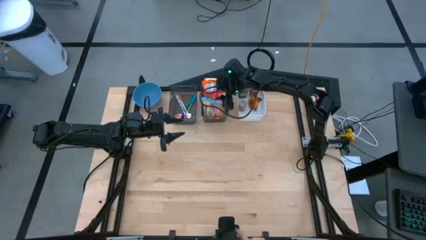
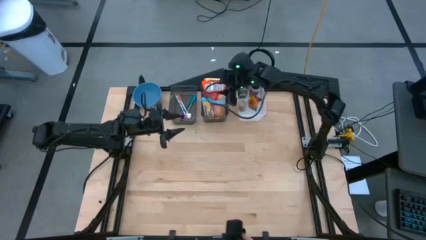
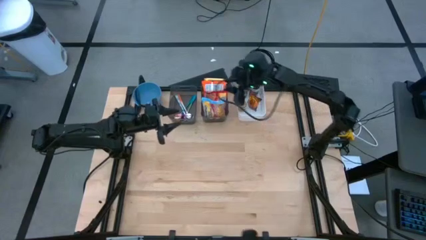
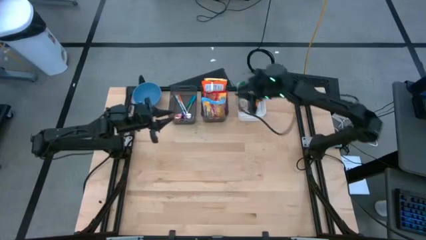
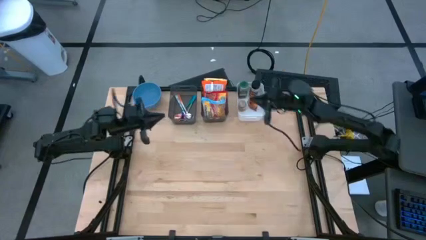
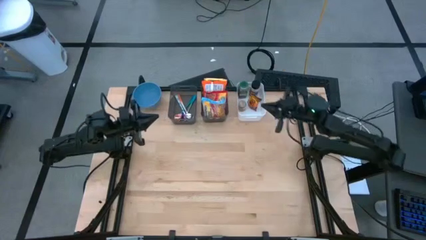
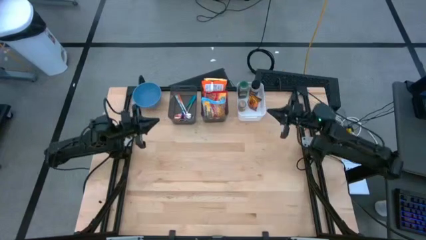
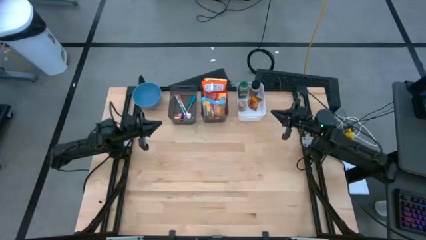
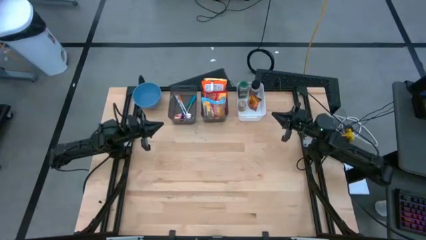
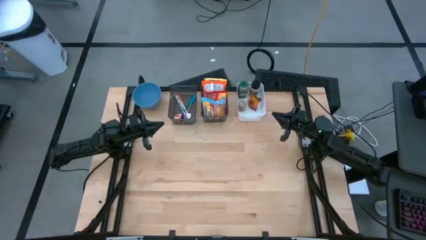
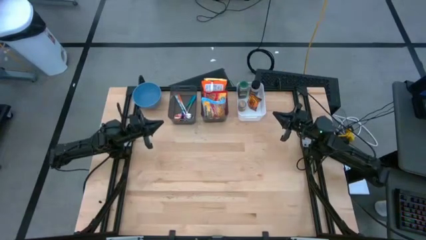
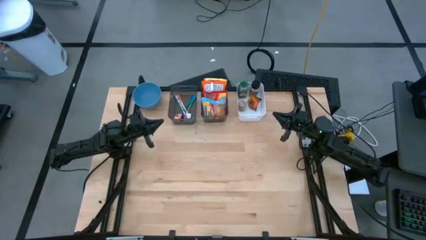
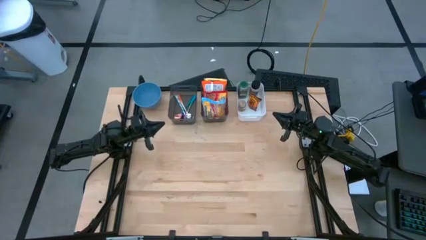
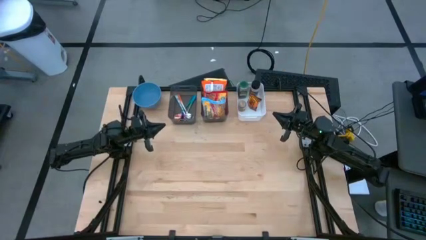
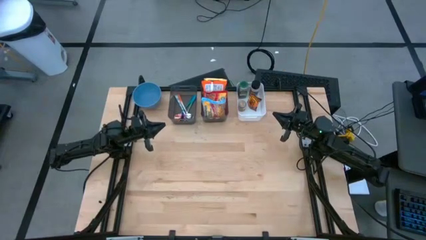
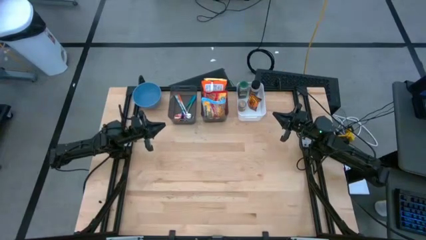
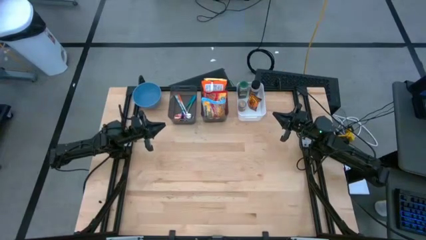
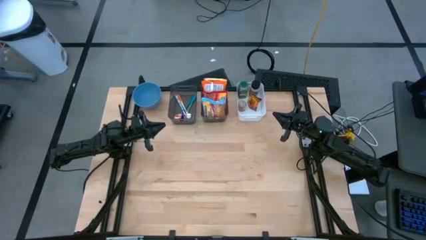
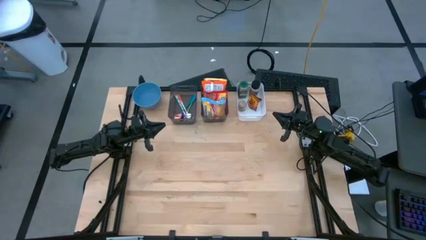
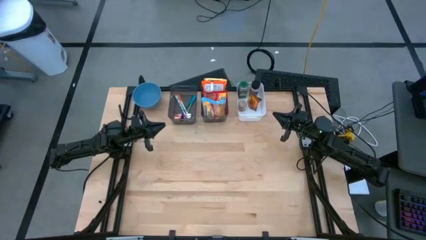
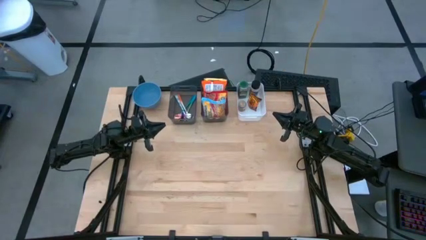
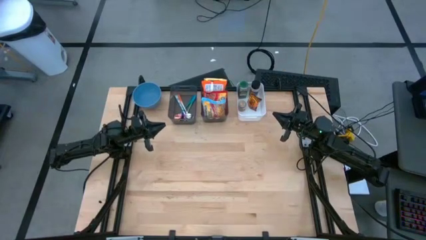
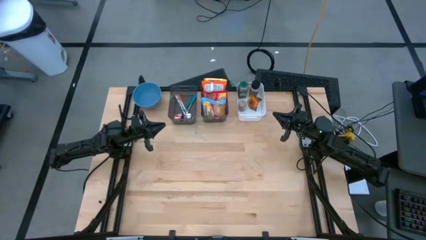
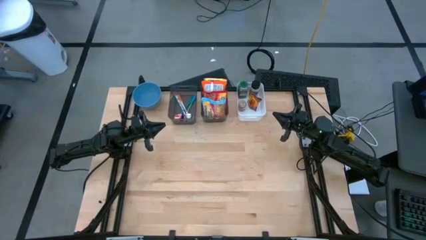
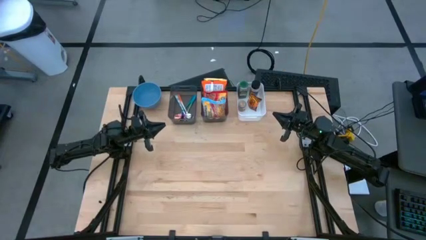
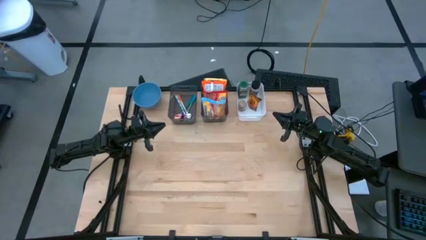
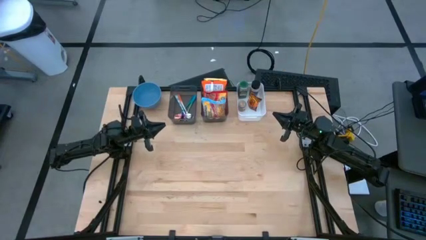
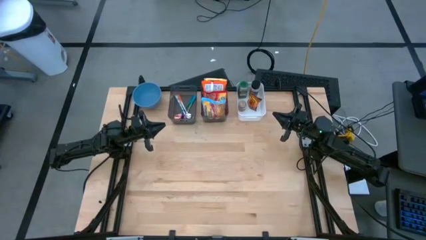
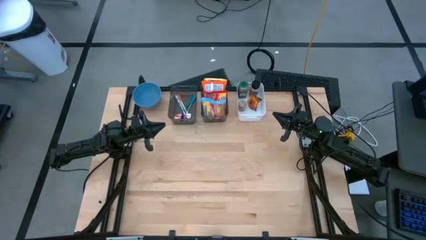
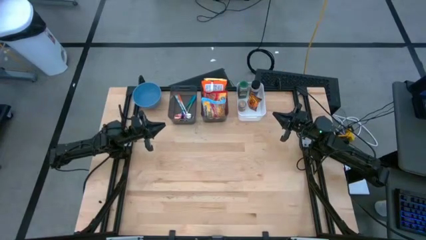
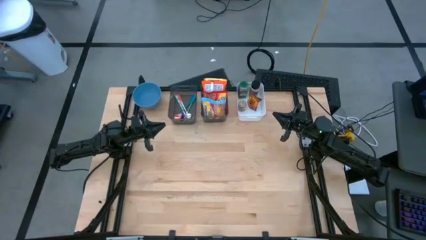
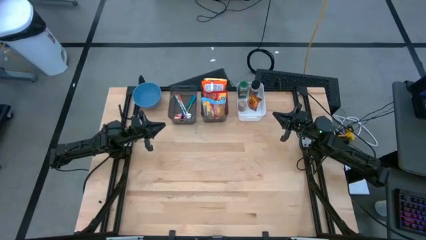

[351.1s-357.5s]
Task: Pick & Place Food Item
Return to Home Position

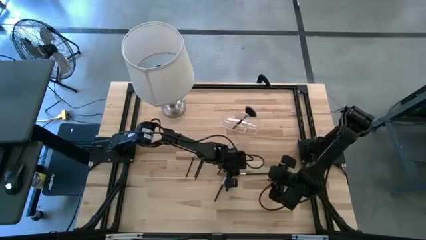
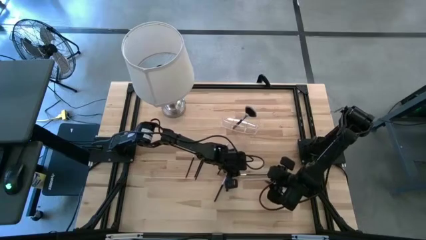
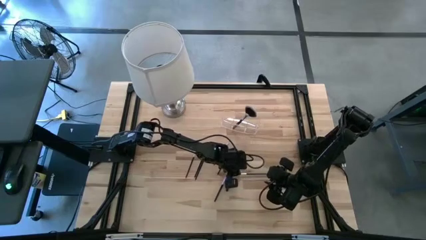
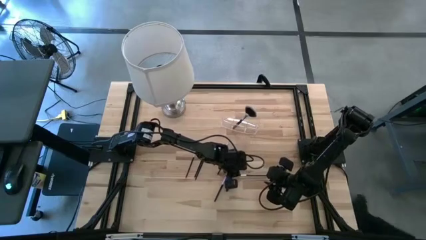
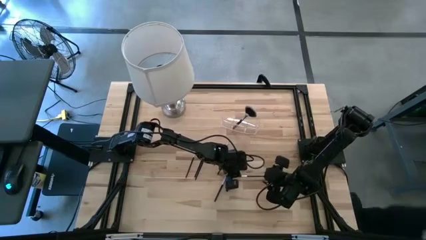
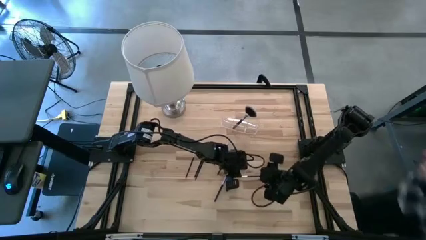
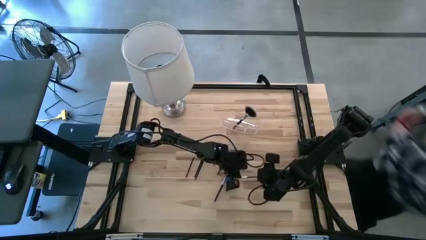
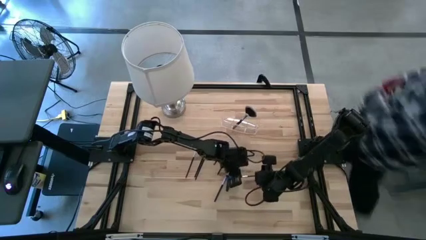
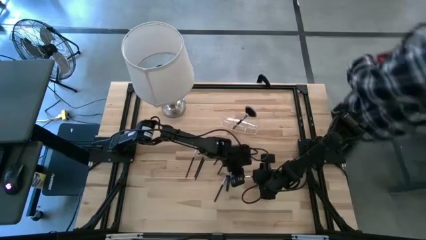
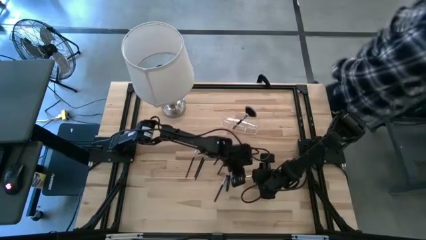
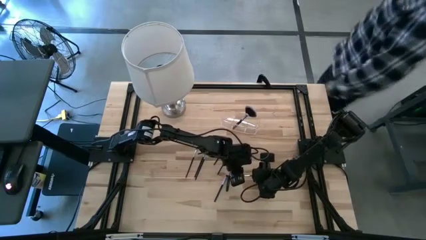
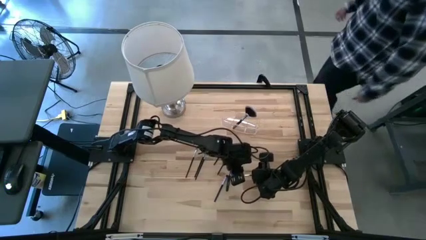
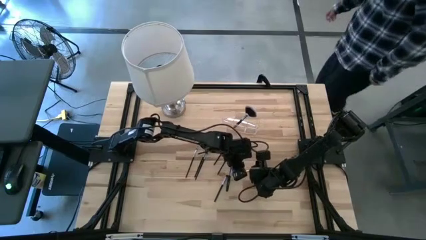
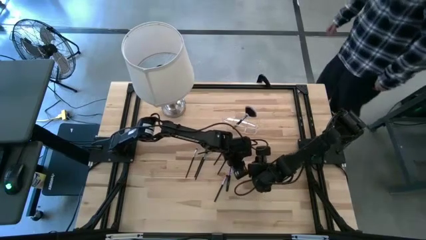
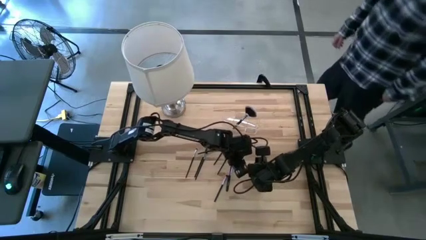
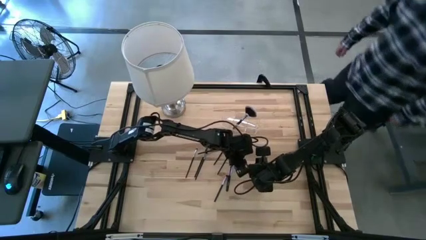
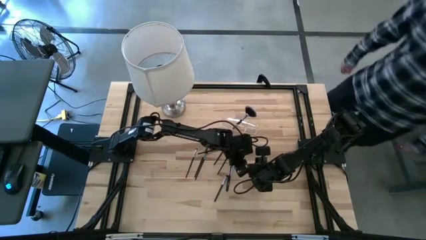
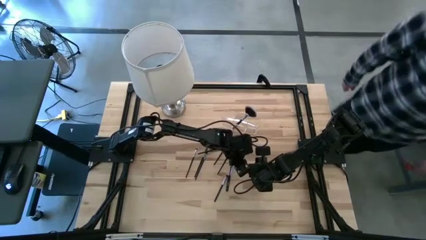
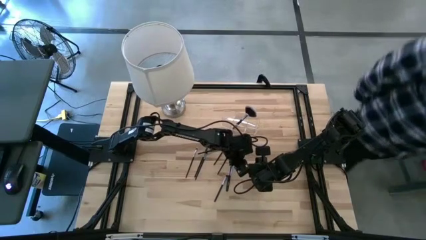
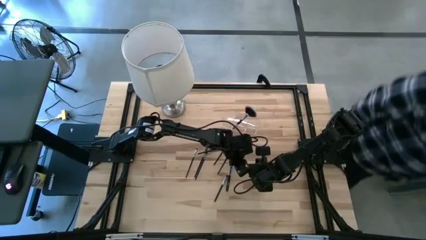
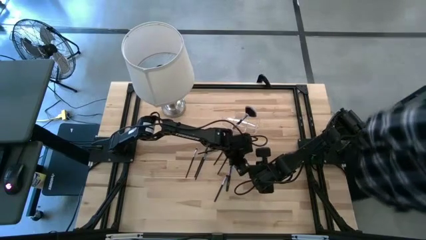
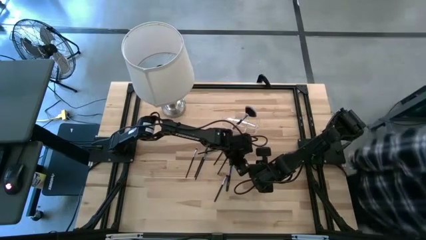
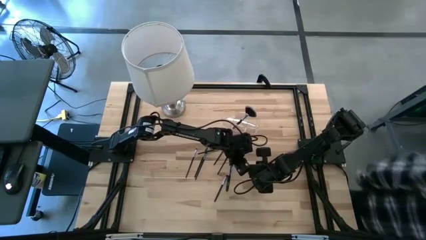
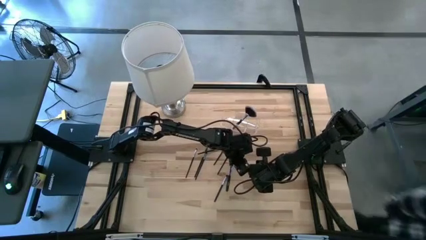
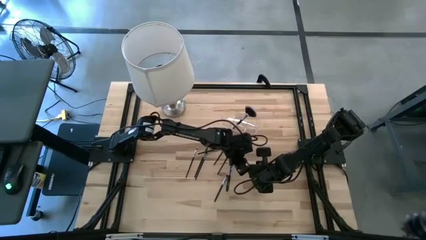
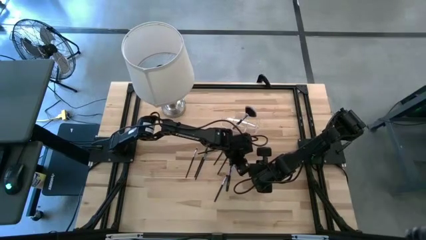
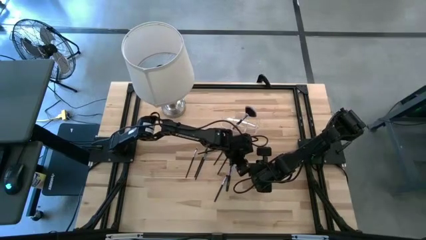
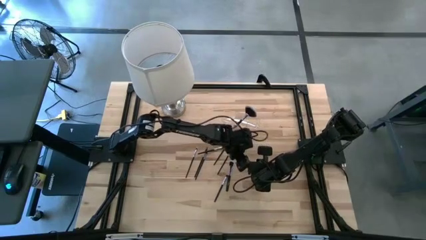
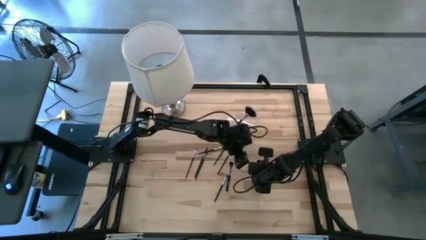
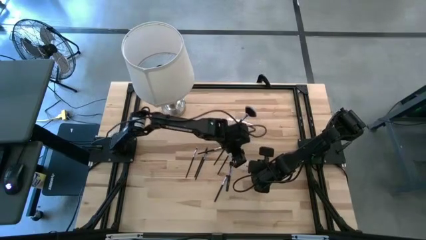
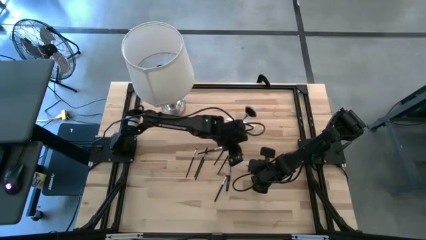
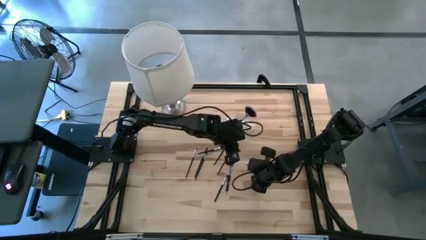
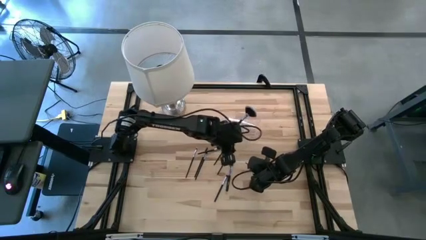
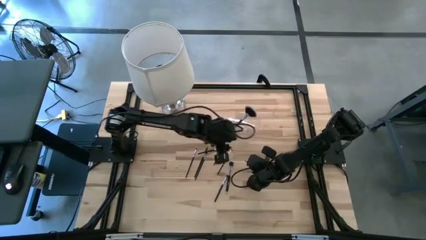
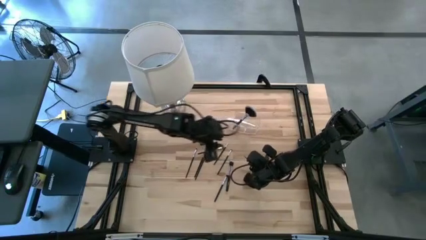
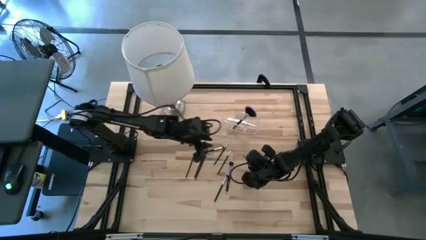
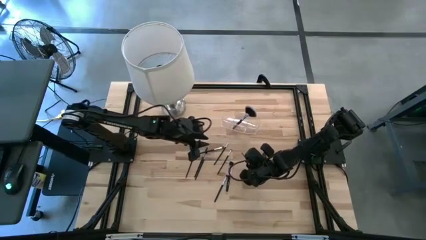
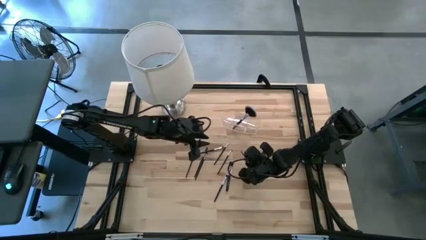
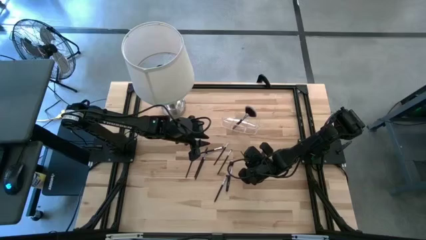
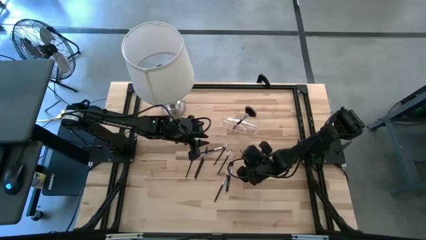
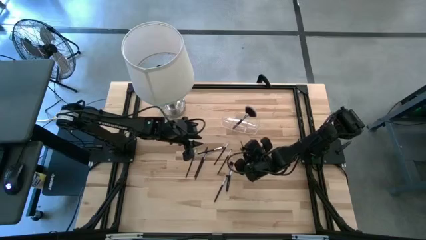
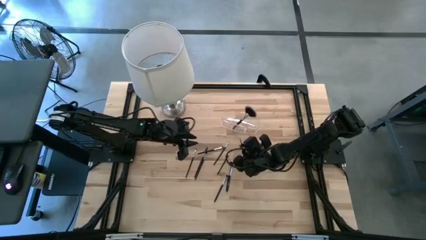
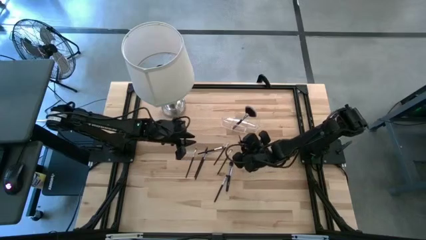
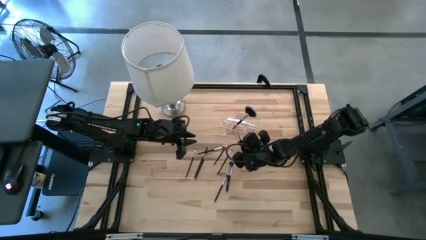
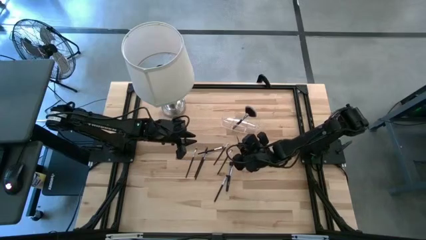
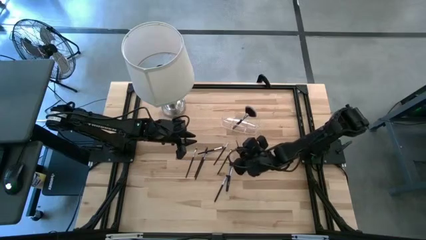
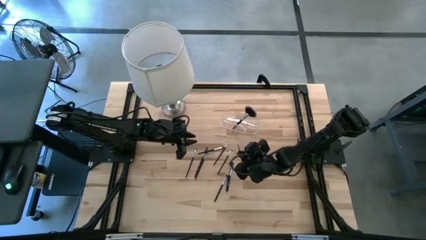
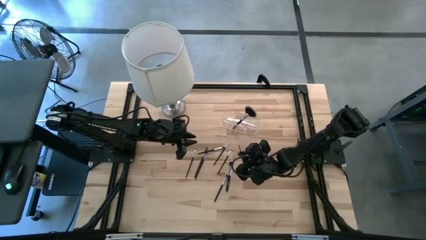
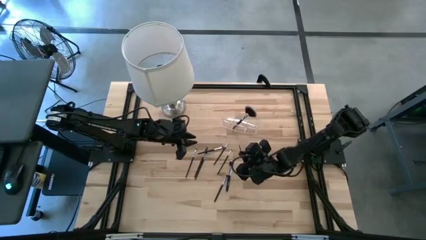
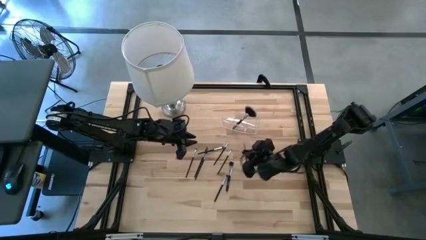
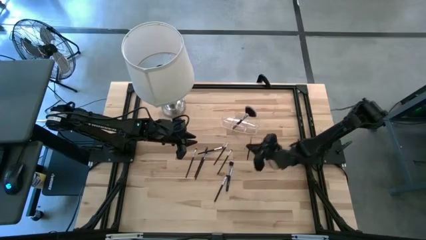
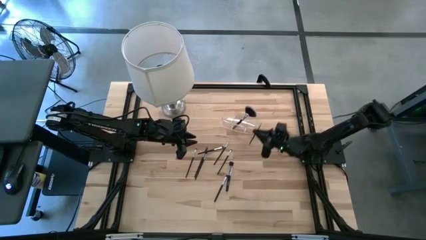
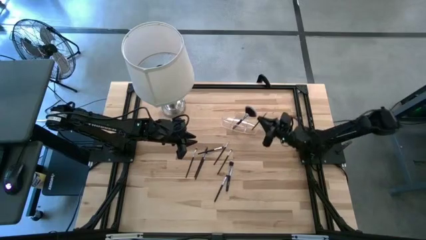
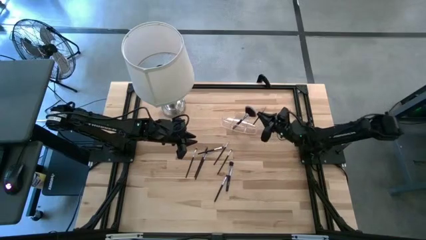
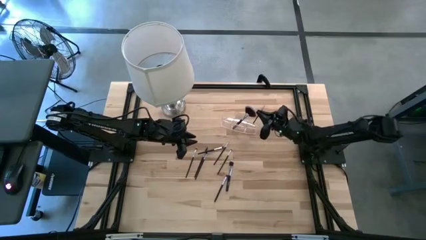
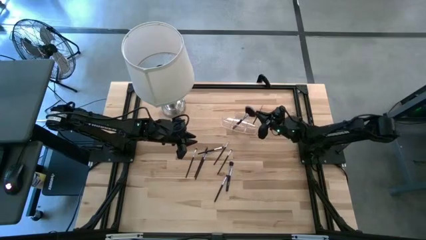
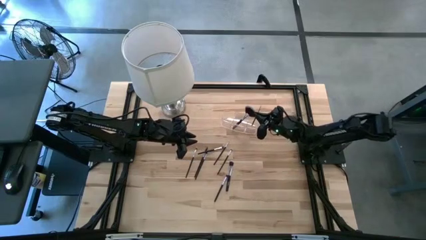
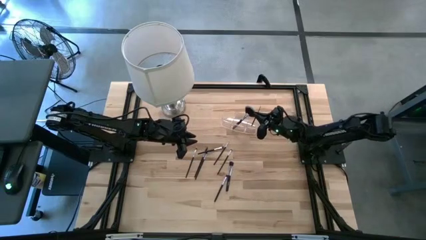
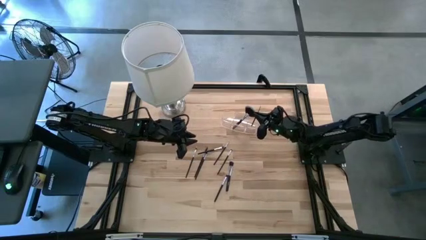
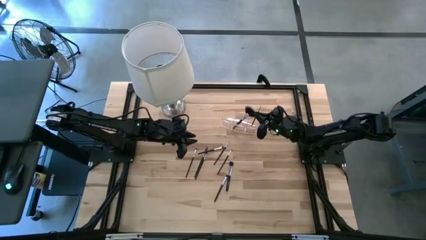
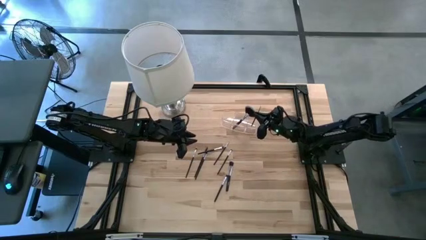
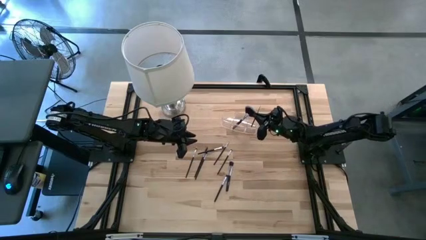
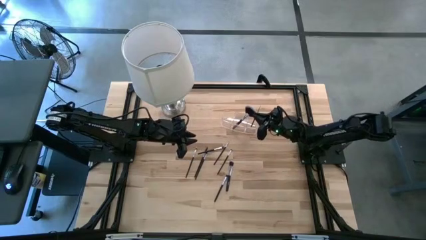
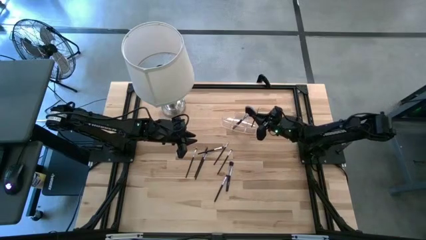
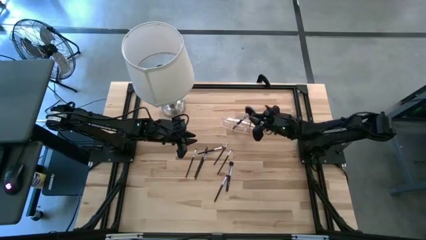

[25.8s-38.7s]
Task: Pick & Place Makeup Supplies
Put the makeup brush into the transparent organizer
